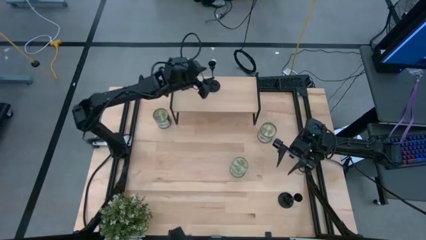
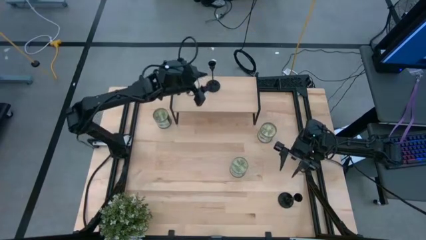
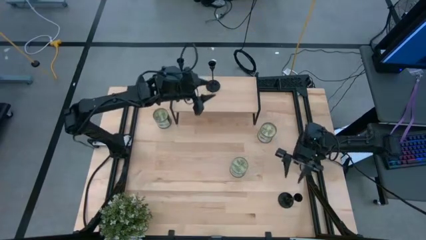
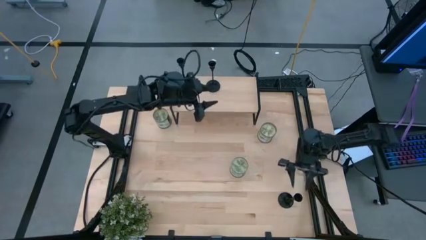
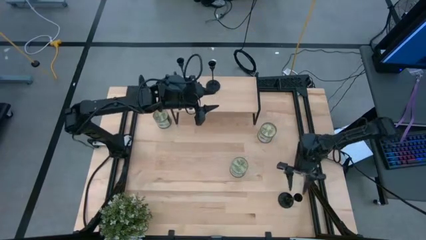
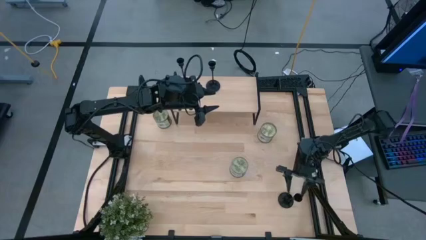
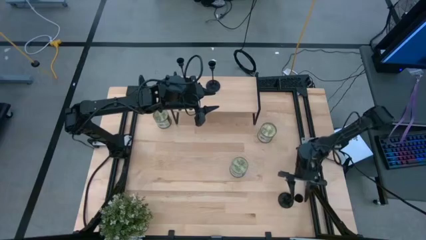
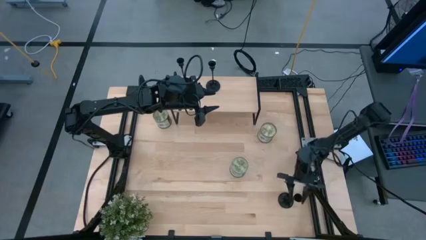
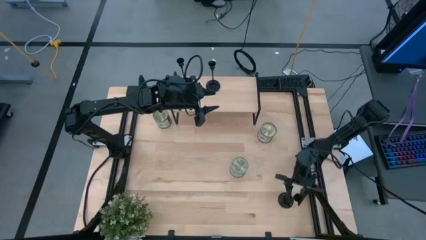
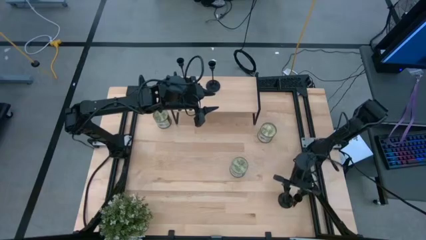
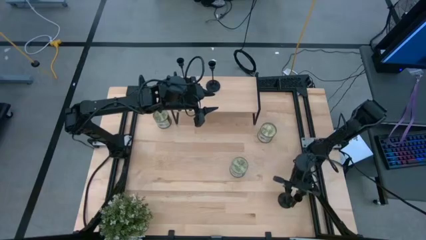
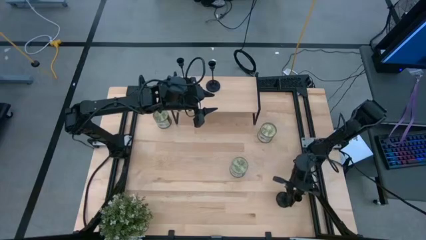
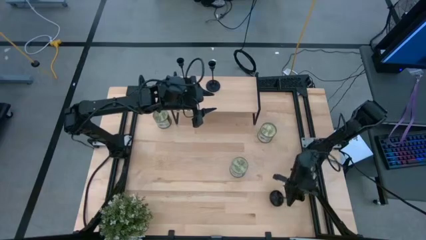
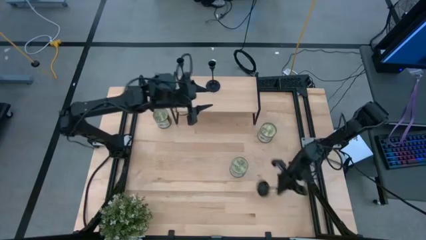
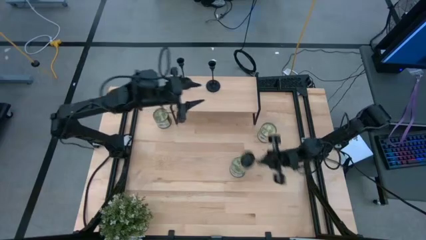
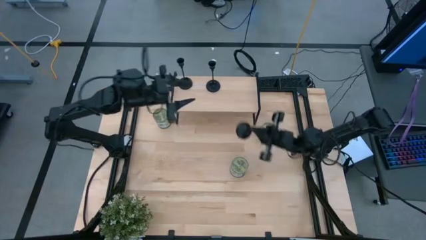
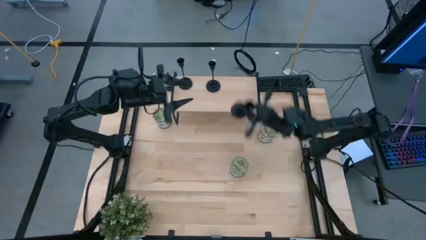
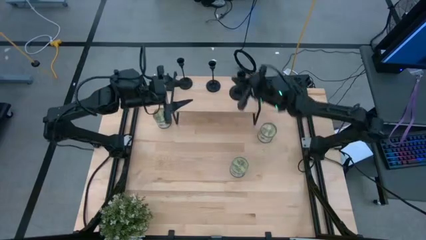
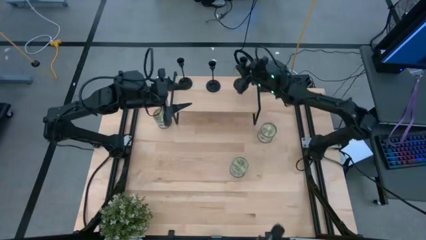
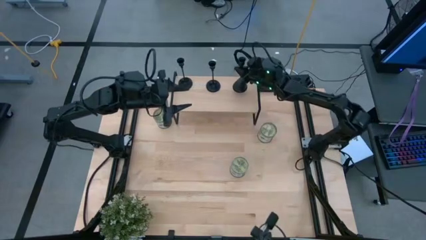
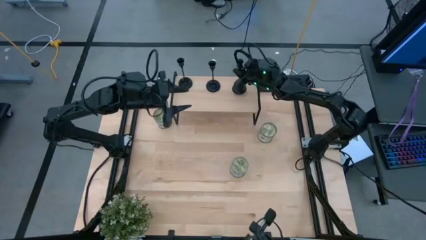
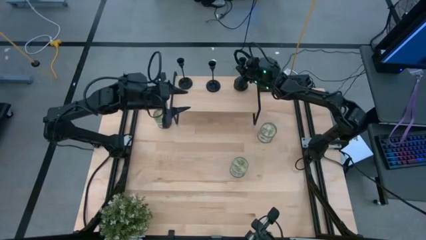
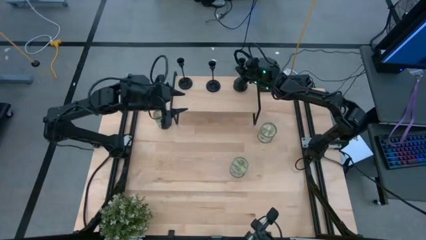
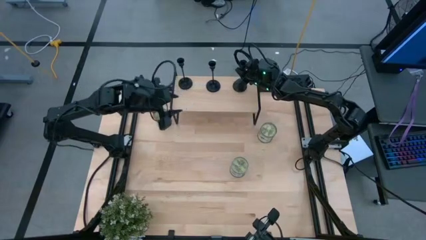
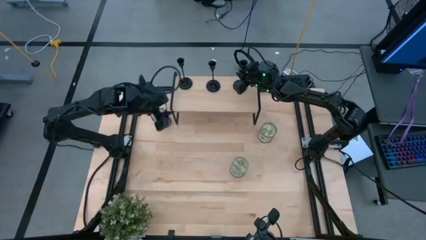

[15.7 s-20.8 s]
Task: Pick & Place candle stick holders
Put the black candle holder on the shelf

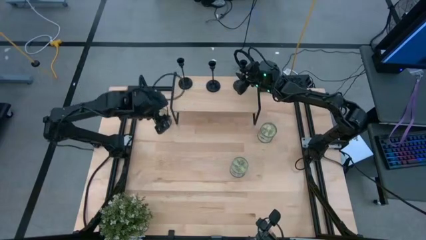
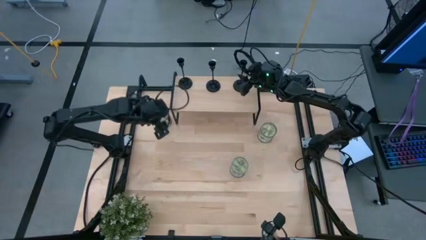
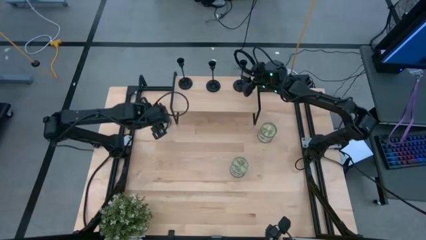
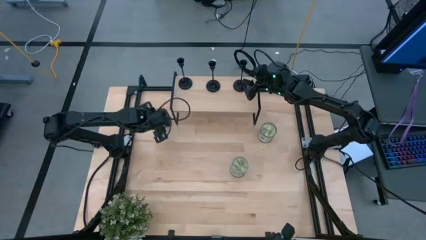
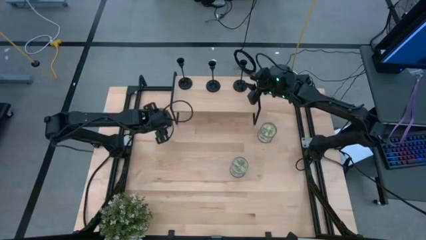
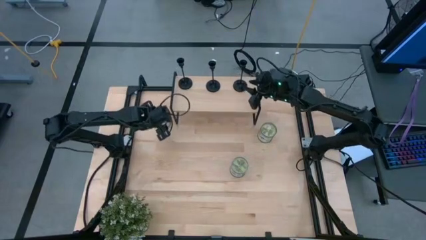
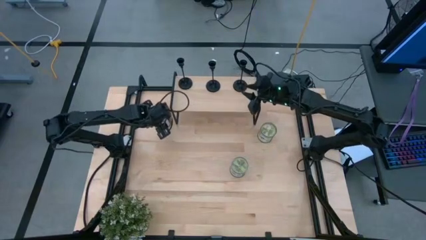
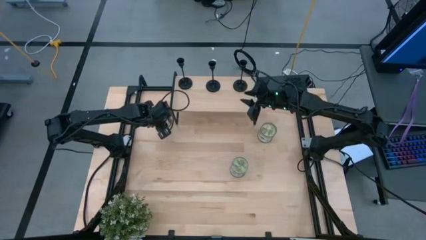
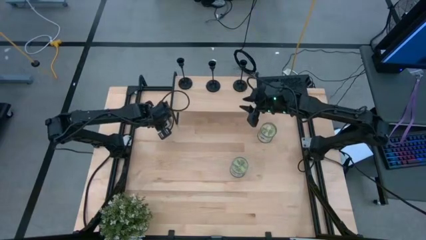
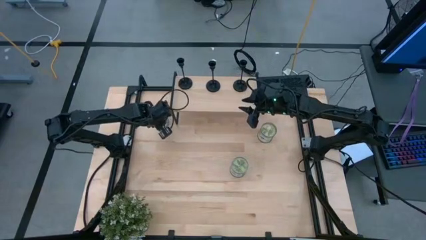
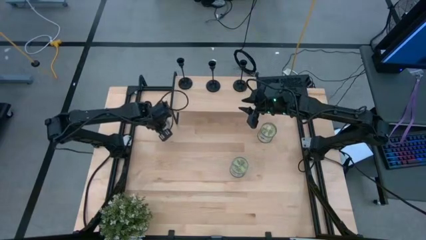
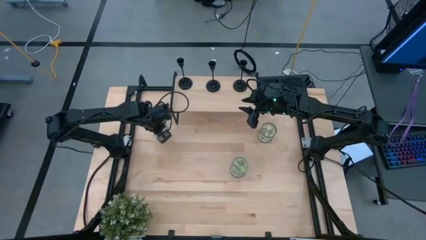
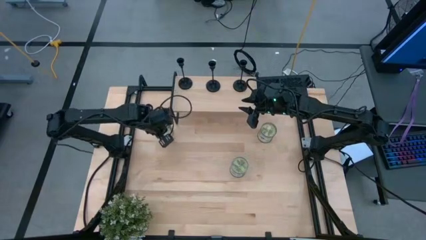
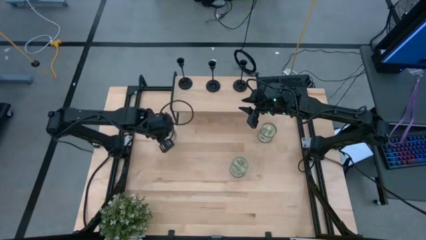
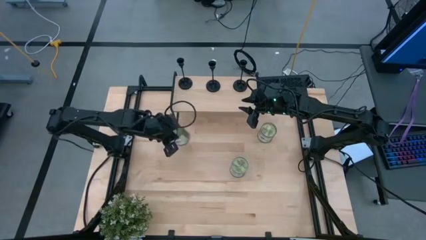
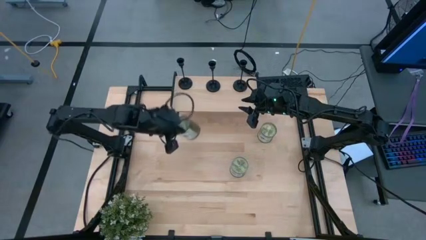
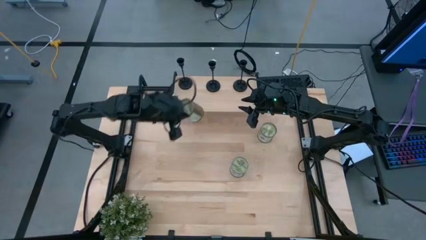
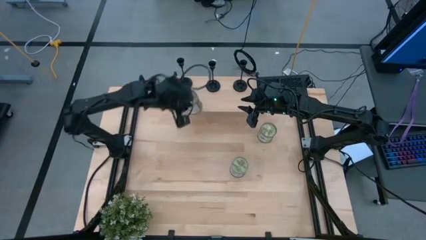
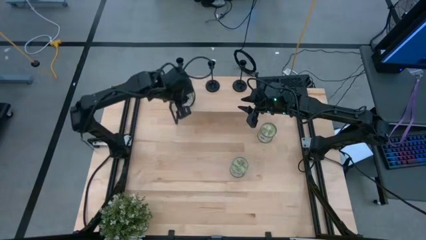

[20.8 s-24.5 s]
Put the top green scented candle on the shelf

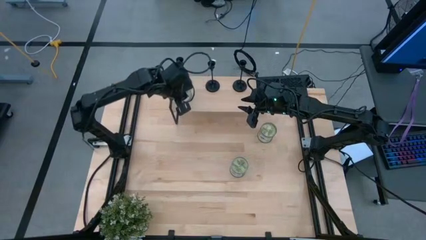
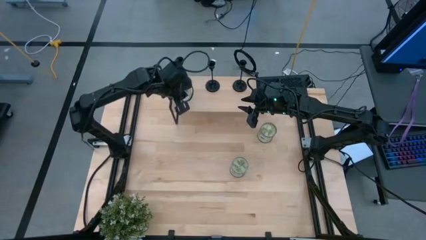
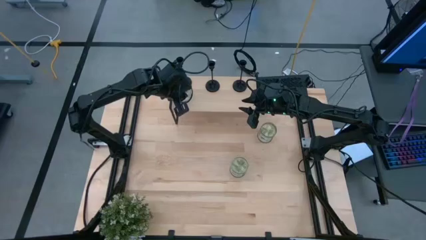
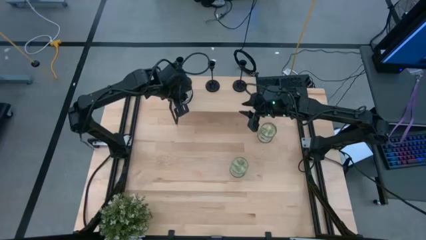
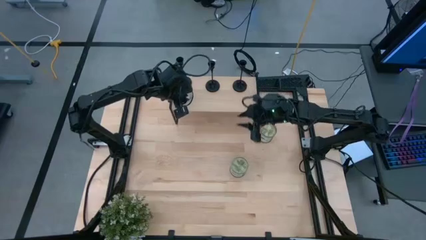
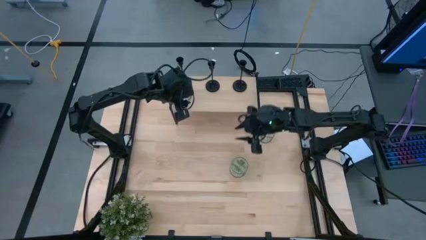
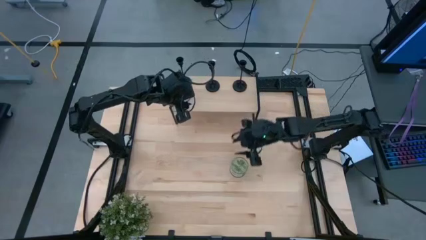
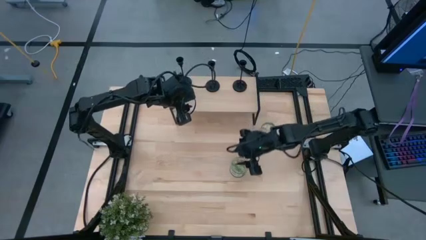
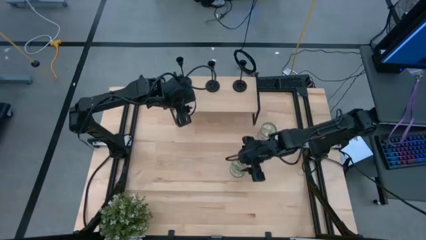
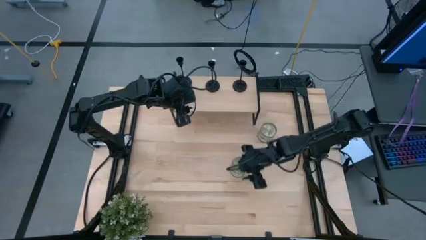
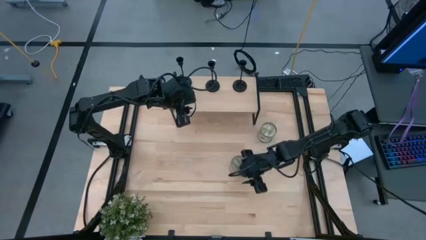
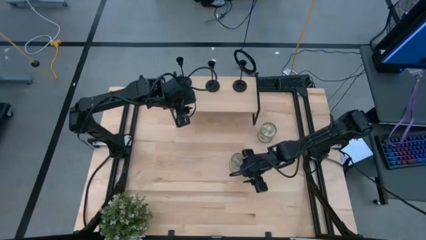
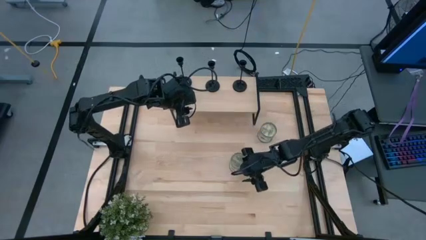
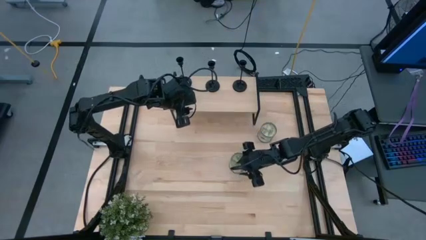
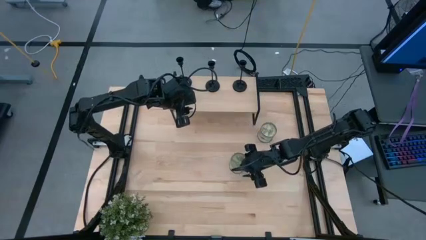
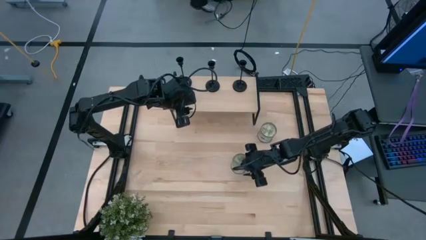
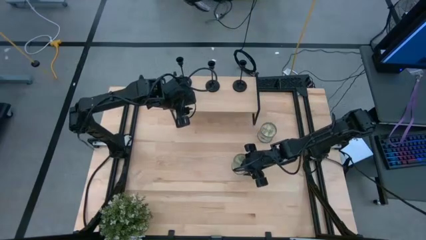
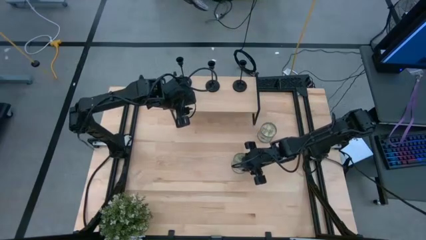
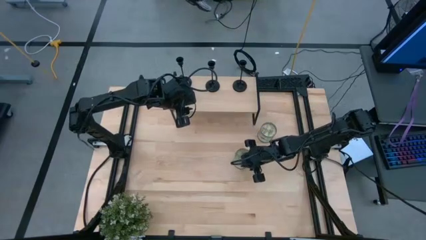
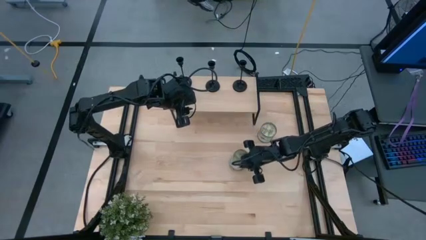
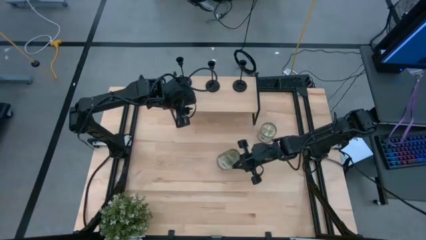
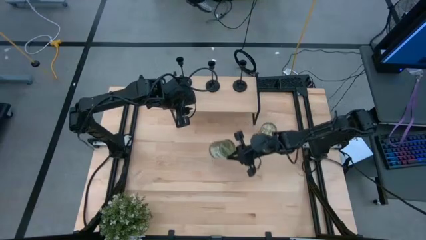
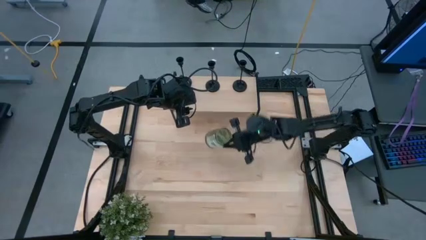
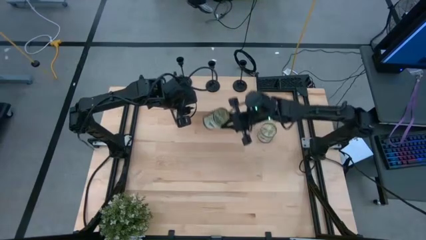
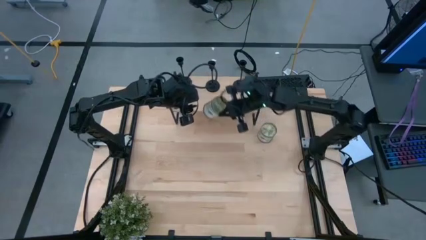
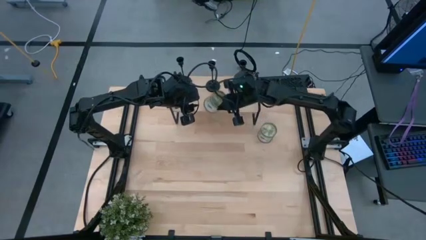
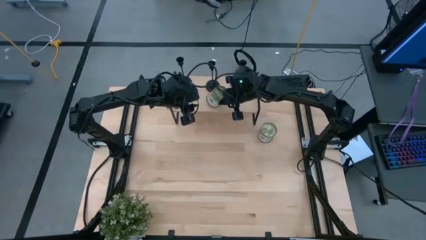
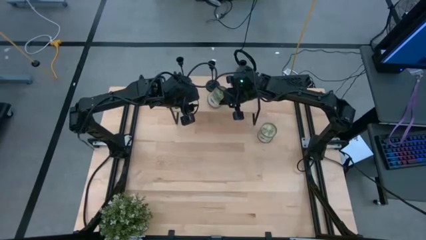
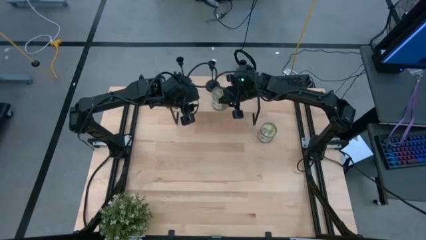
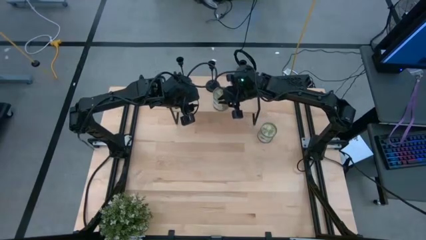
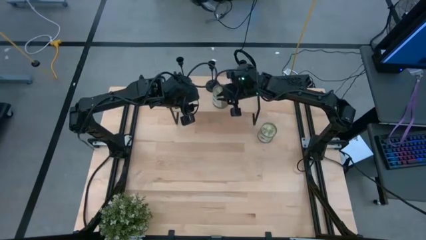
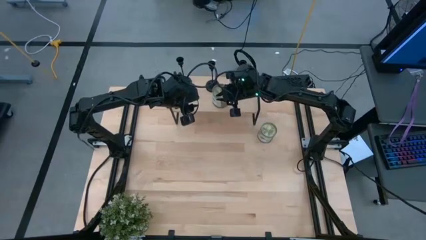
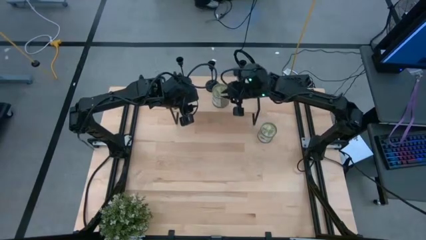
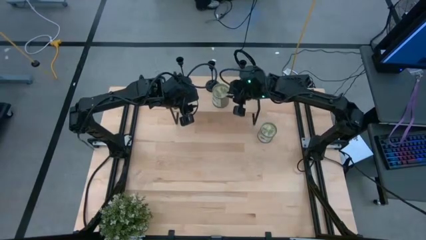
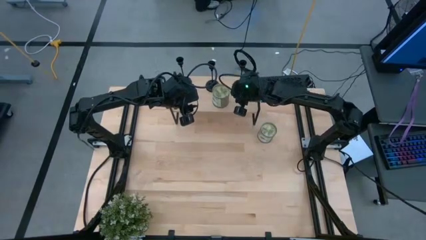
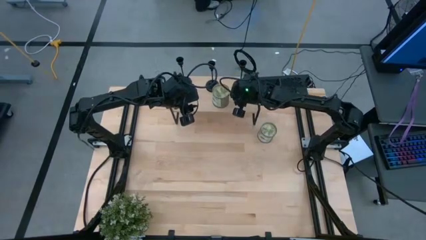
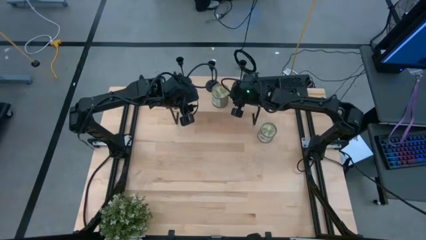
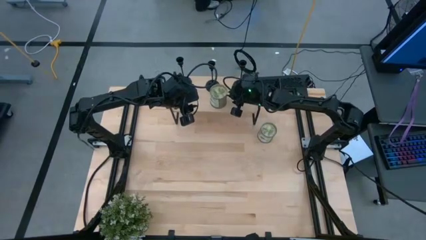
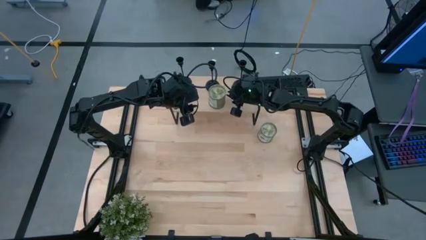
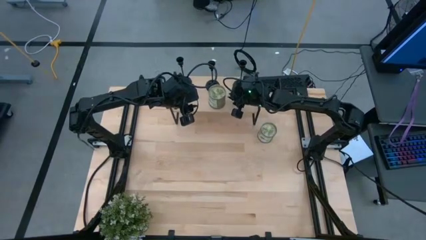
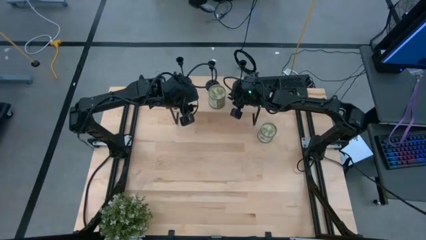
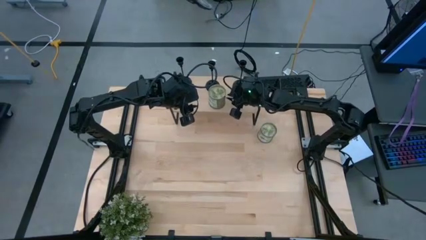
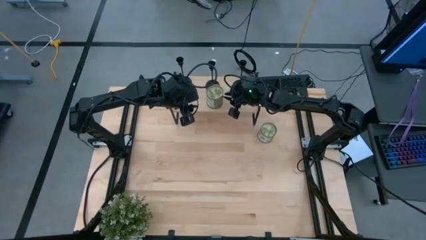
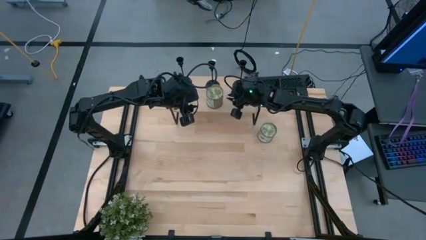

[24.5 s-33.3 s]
Put the bottom green scented candle on the shelf
